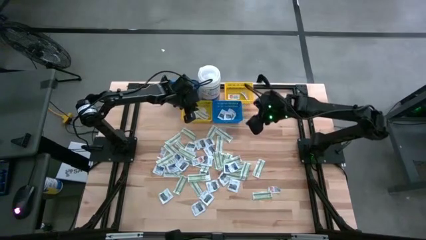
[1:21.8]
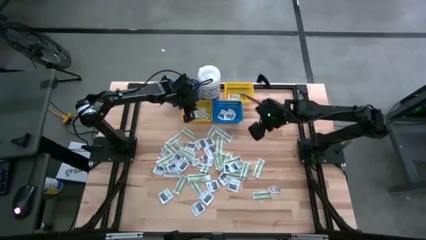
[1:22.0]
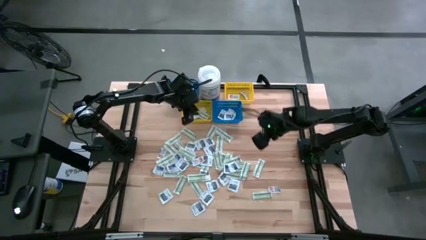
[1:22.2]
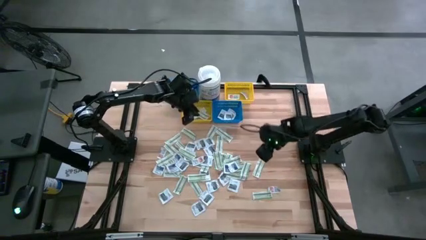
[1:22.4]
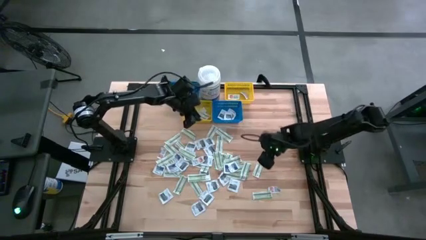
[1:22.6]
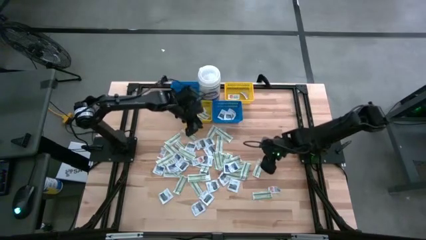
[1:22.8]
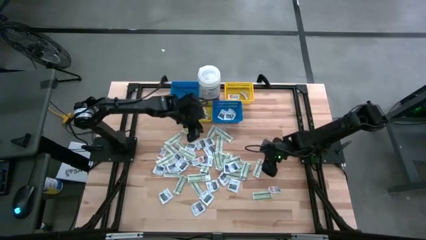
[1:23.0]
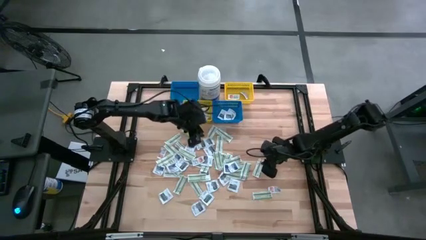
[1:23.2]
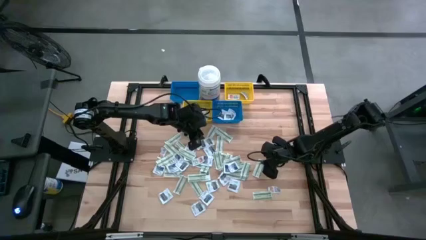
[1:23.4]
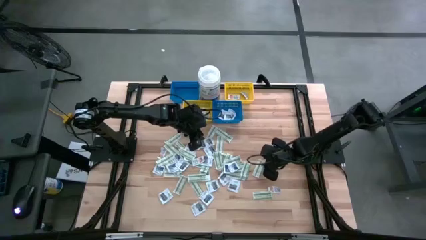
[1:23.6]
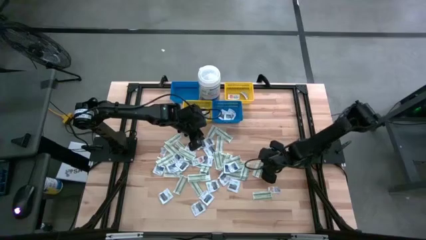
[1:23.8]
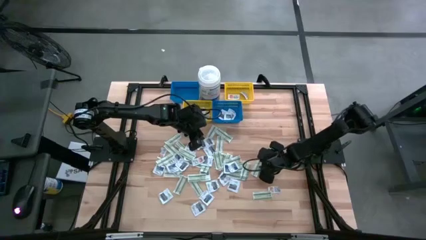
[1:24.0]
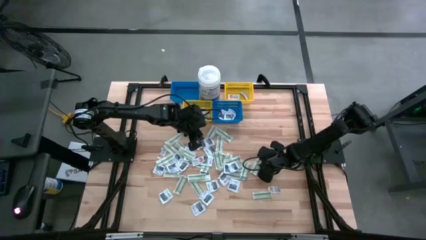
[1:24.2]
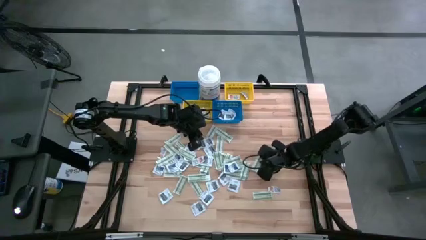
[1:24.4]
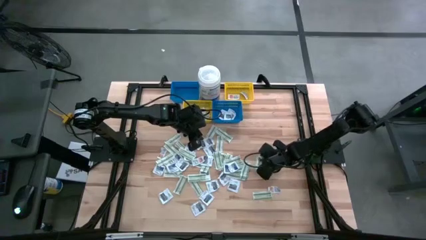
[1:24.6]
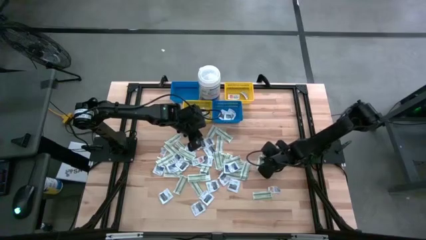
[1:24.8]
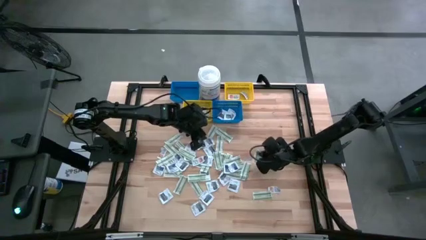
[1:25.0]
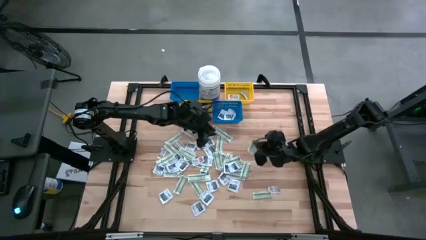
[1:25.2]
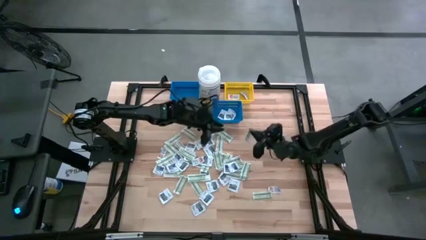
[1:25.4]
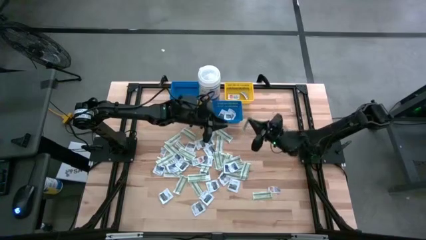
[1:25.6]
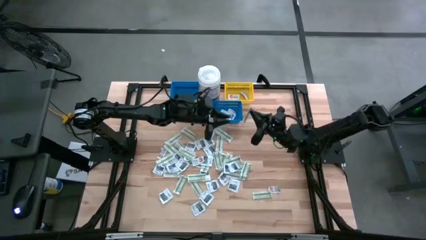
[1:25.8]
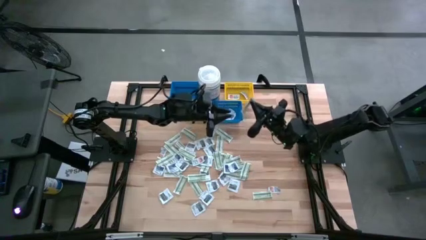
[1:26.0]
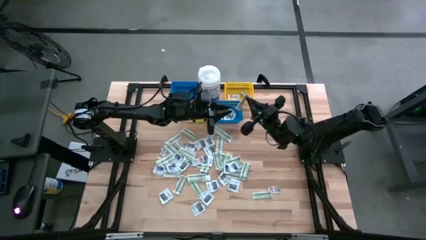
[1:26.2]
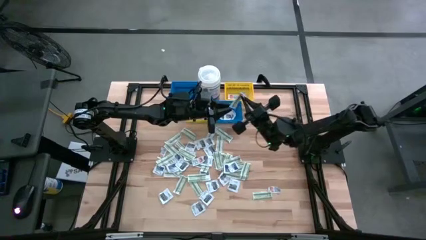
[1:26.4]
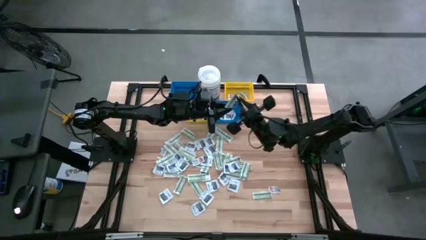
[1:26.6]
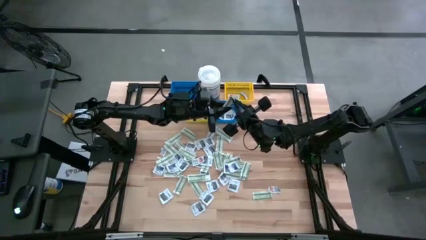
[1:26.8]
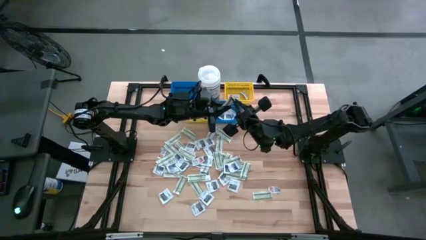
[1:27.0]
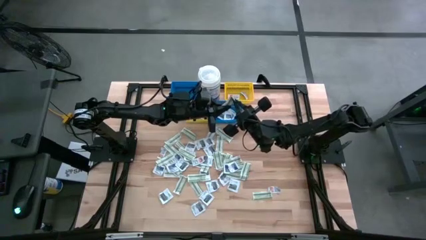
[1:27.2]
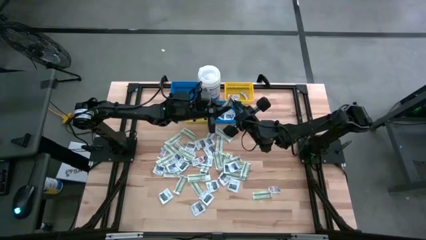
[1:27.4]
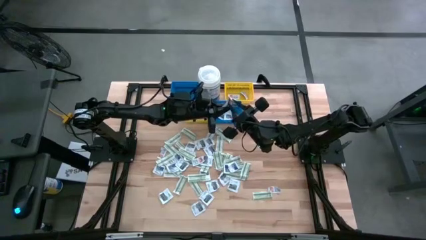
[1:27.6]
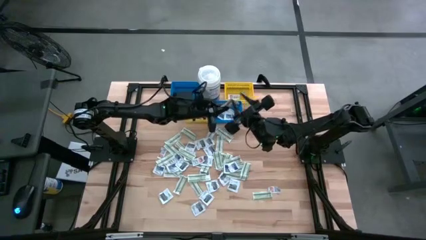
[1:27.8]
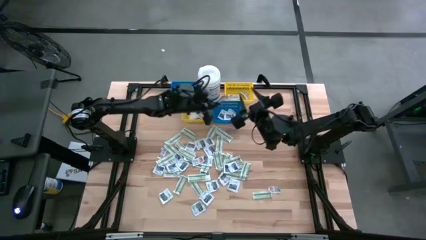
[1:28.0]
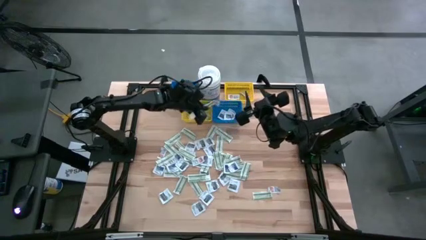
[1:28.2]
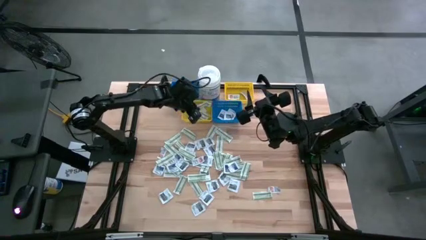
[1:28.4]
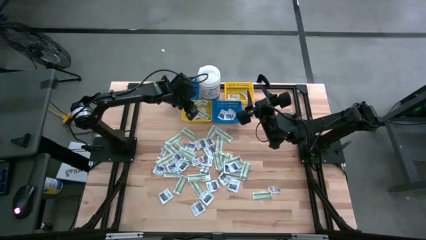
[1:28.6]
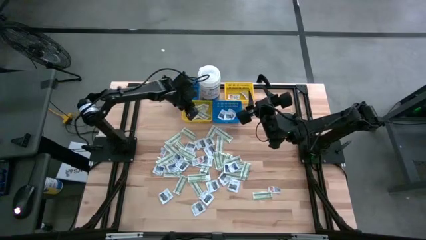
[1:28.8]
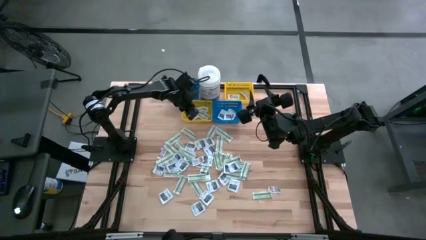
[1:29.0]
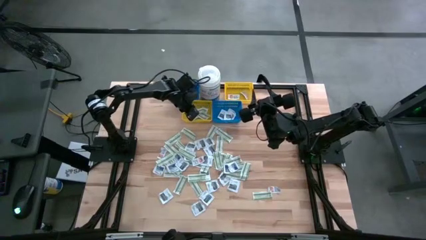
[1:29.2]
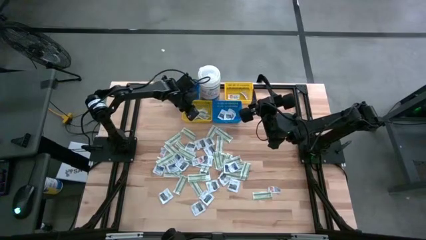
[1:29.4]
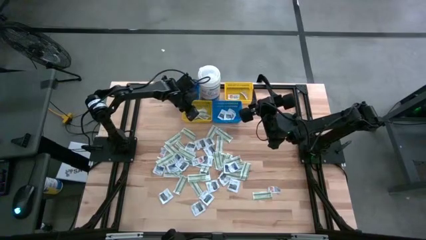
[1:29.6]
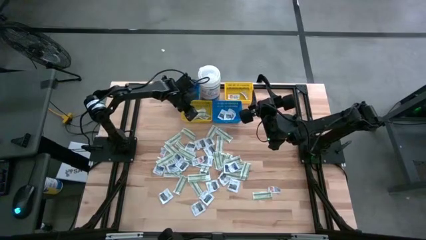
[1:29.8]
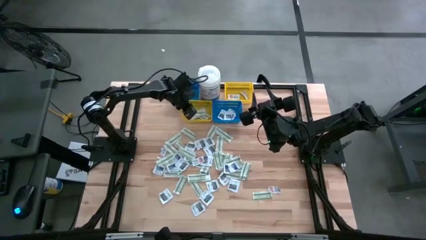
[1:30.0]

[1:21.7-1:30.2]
Task: Pick & Place First Aid Supplies
Put the green bandage pad into the left yellow bin

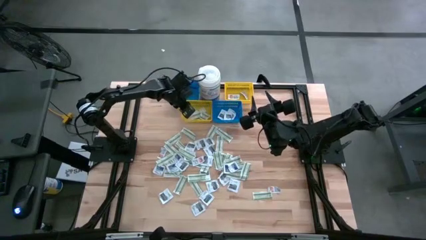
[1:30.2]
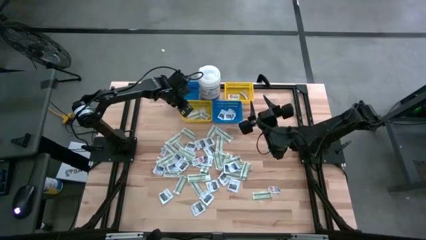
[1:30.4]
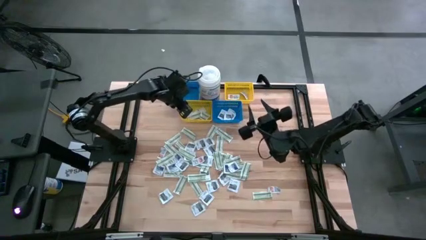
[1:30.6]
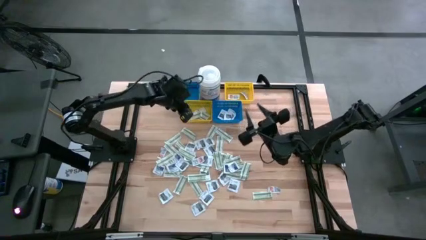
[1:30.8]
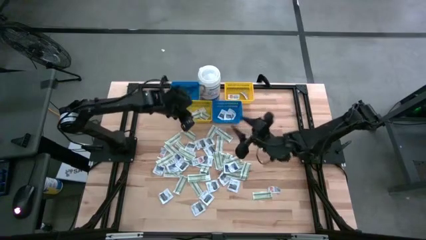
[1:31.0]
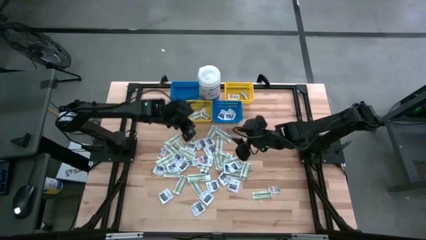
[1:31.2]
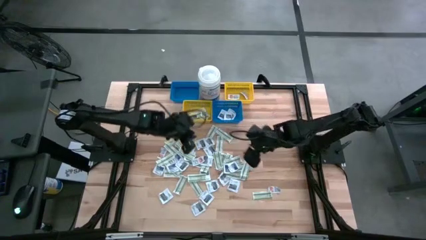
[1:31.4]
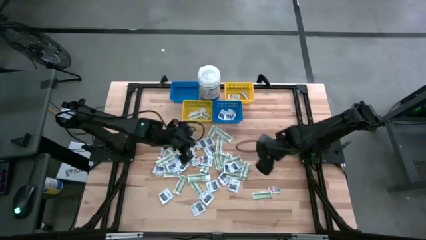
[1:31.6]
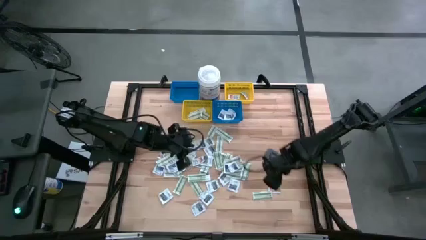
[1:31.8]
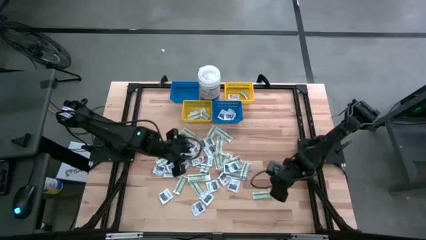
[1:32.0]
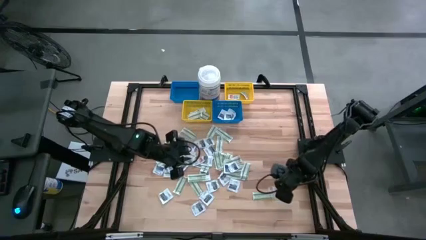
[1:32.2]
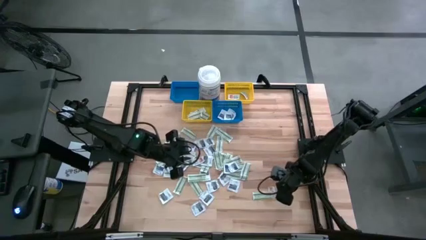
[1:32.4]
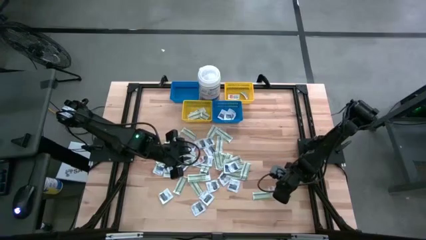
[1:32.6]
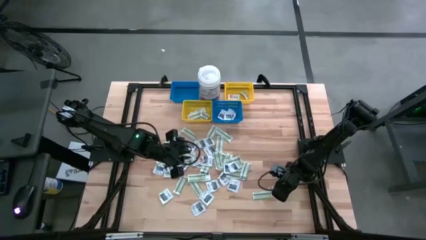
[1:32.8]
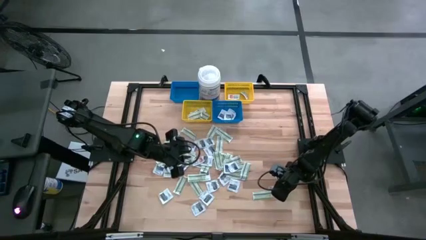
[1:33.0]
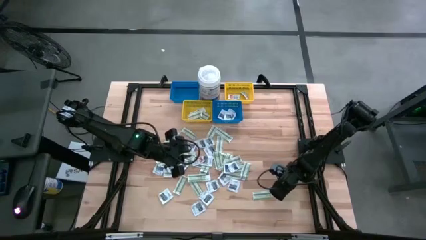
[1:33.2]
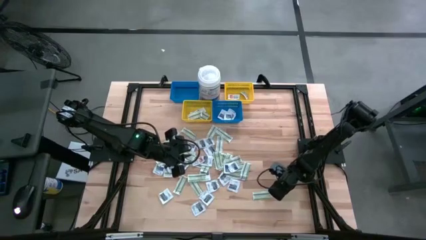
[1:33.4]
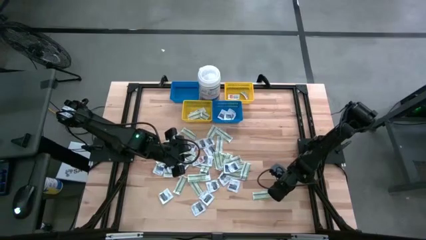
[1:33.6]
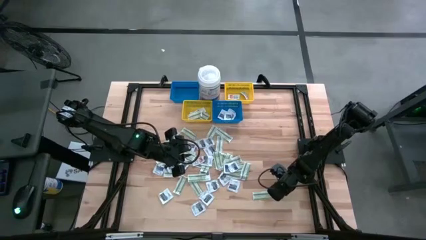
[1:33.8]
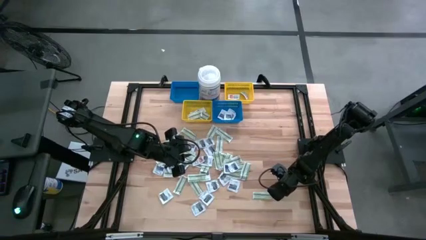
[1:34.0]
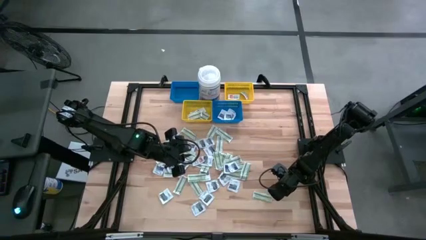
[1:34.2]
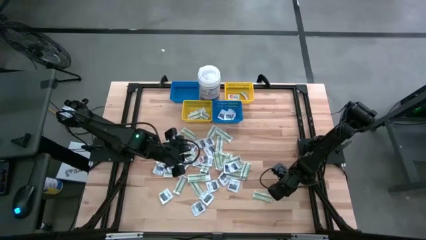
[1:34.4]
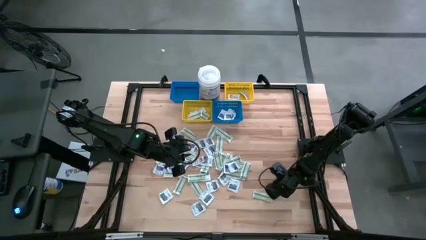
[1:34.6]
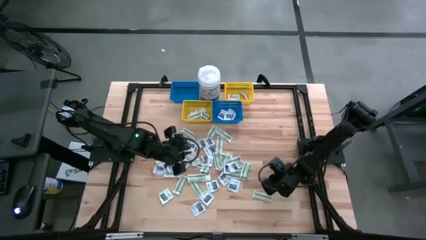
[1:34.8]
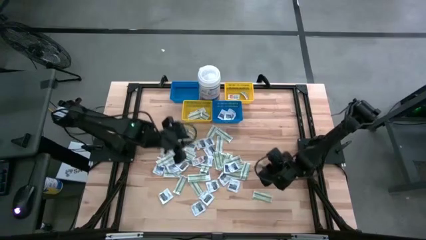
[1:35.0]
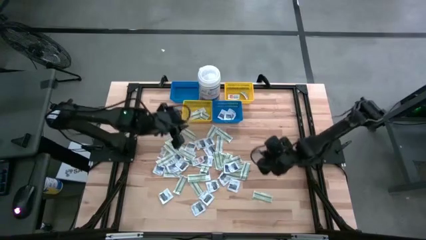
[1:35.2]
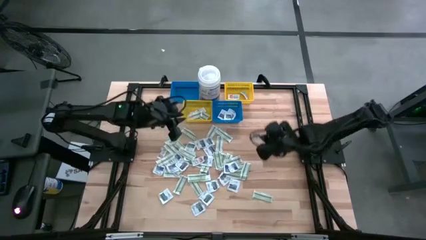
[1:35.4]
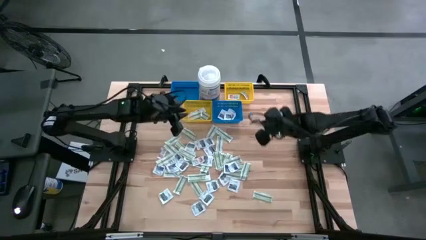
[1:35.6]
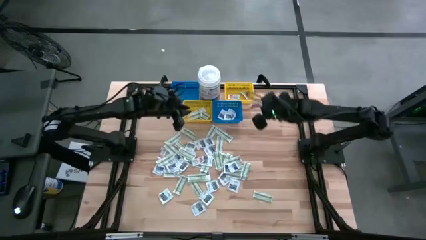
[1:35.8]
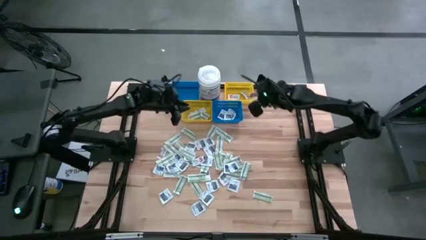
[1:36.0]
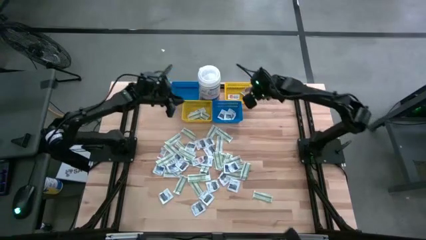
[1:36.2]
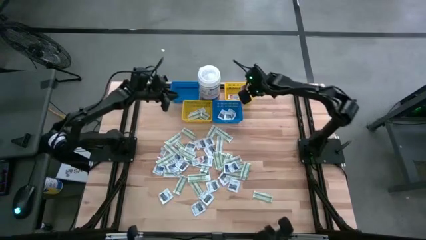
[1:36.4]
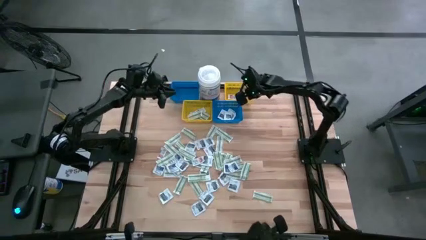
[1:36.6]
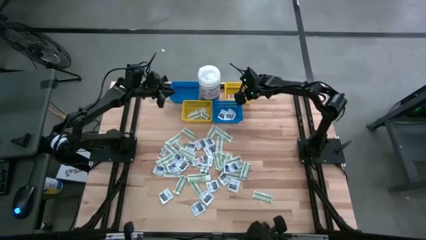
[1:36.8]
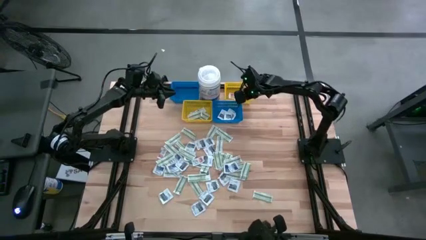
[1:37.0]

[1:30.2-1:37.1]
Put the orange ointment pack into the right yellow bin

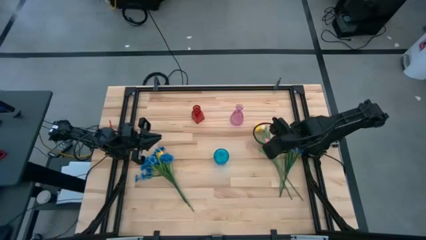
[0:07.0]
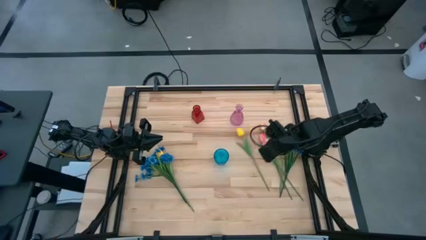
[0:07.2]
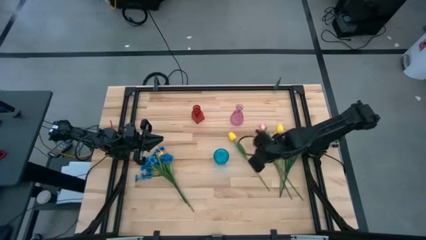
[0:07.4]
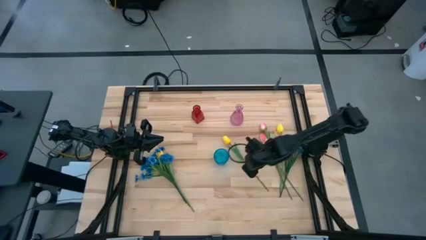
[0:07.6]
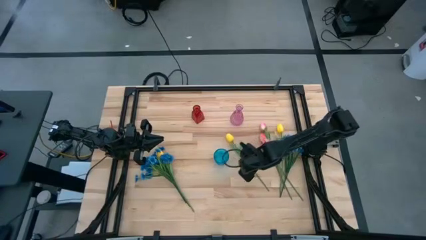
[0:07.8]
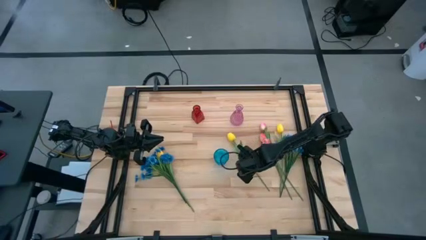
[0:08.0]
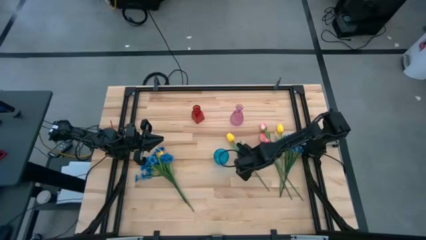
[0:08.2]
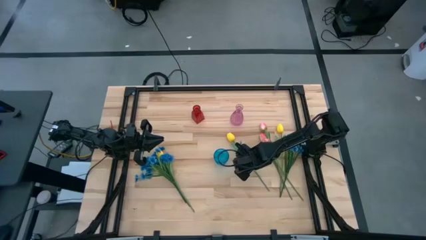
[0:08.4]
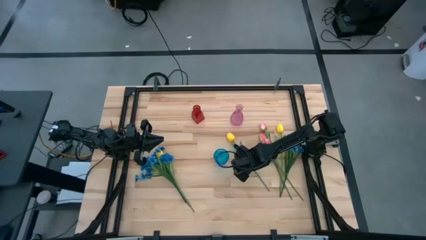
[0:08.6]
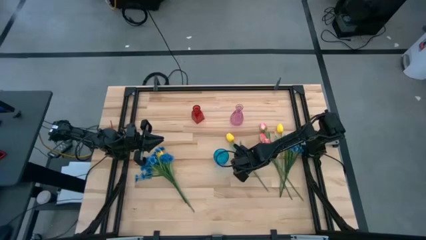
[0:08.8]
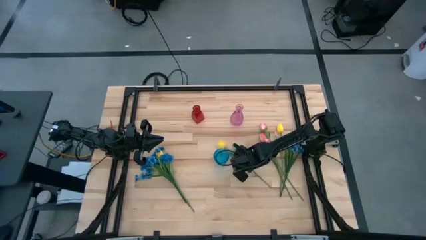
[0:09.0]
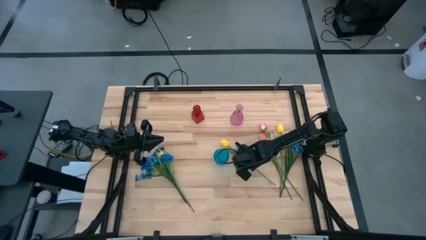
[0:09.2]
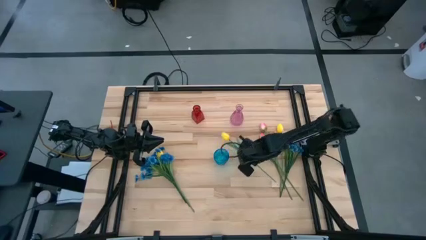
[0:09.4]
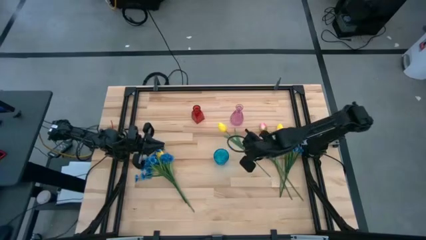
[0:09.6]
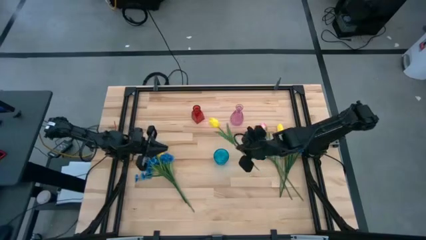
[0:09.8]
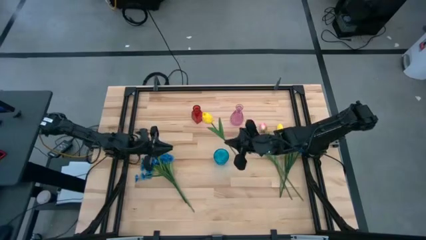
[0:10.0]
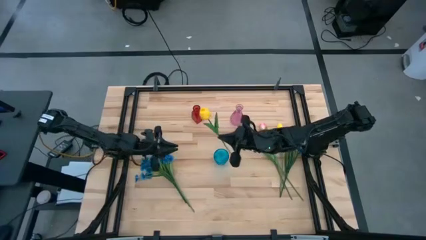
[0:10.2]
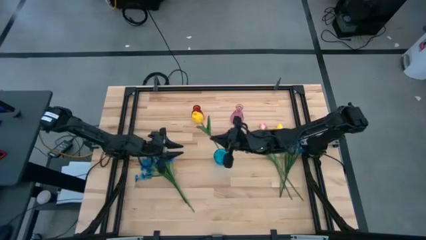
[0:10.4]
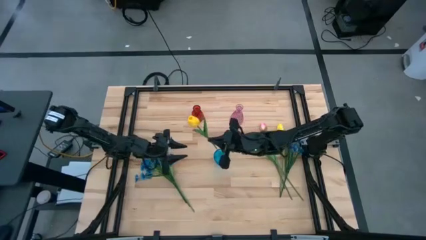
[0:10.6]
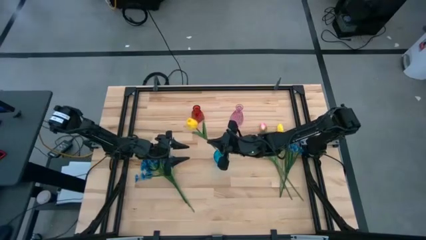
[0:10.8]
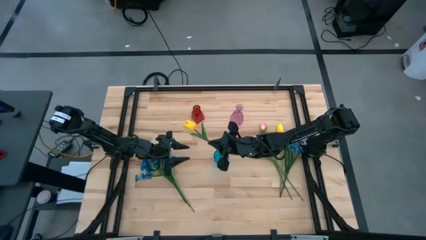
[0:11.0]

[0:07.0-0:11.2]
Task: Sort flowers into vase by color
Put the top left yellow flower into the blue vase
